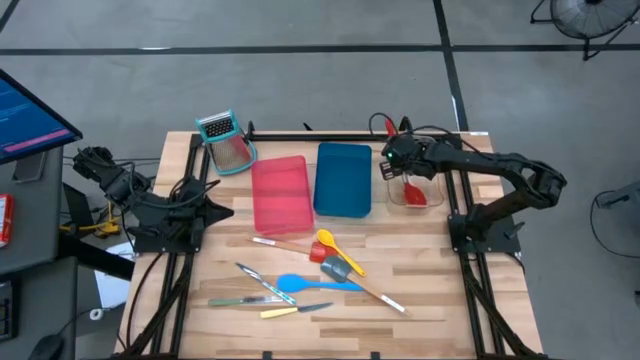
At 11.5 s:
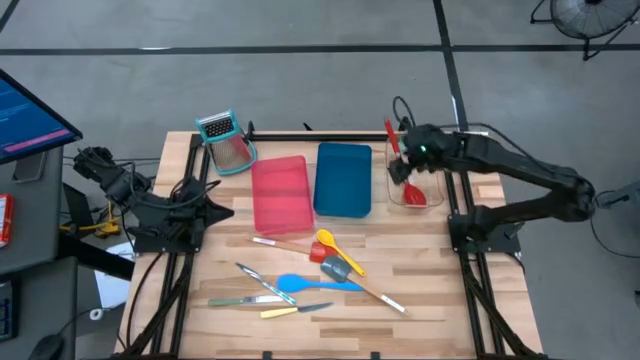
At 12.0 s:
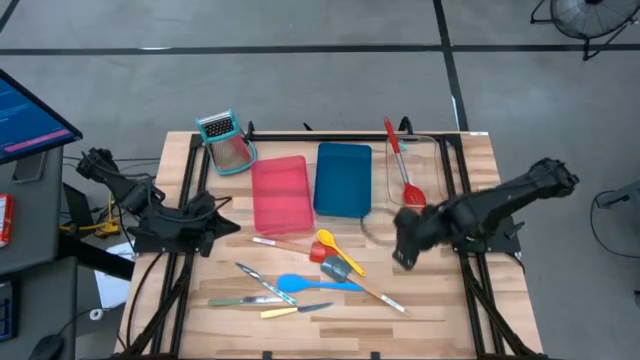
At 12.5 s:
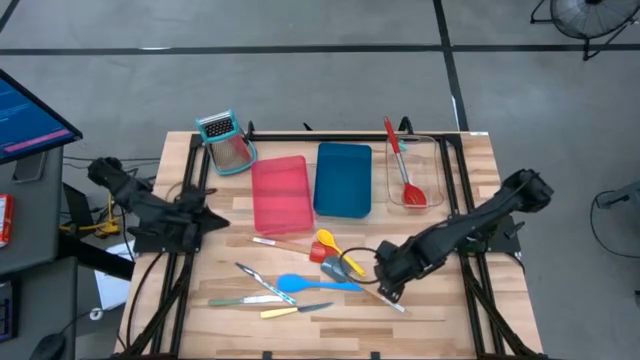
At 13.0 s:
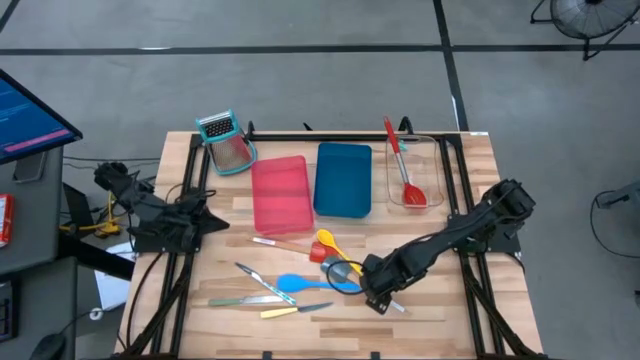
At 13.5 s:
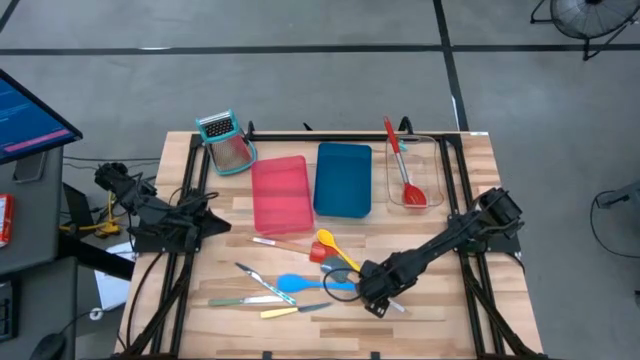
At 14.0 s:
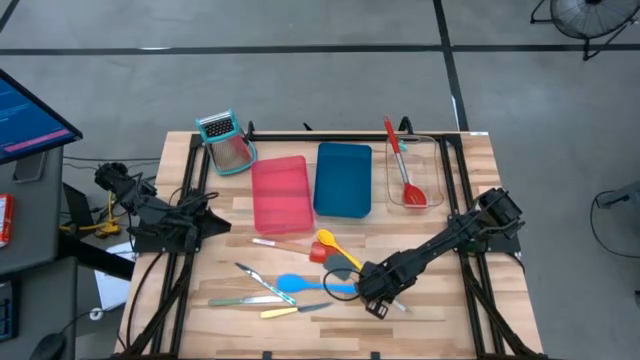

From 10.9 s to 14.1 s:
Task: Pick & Place Kitchen Items
Put the gray spatula into the blue bin

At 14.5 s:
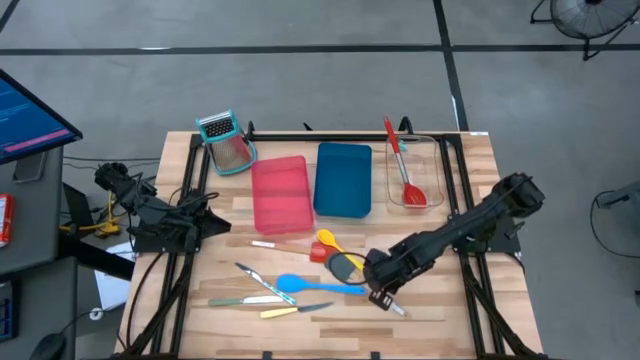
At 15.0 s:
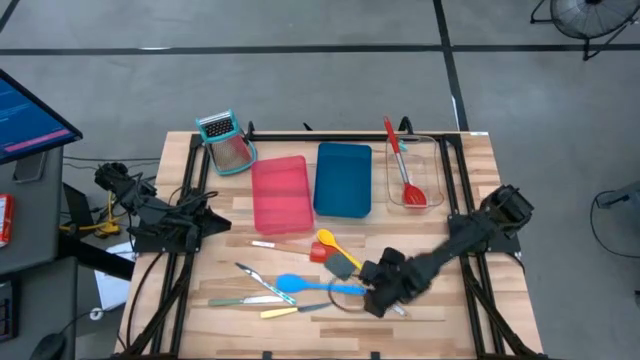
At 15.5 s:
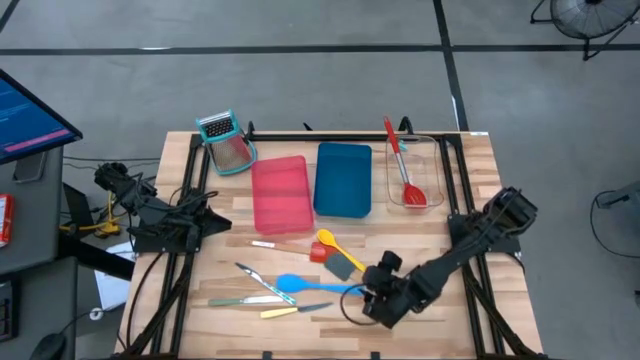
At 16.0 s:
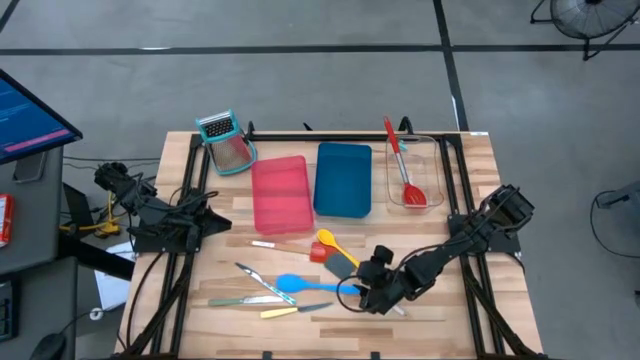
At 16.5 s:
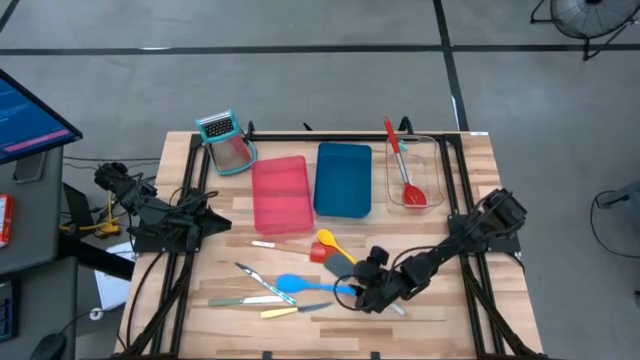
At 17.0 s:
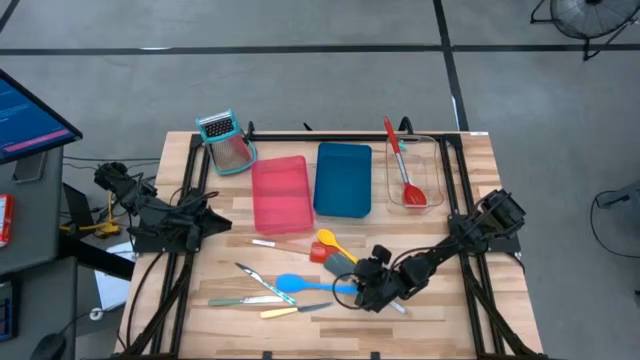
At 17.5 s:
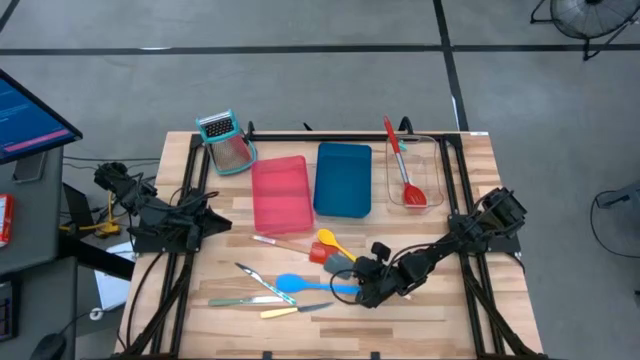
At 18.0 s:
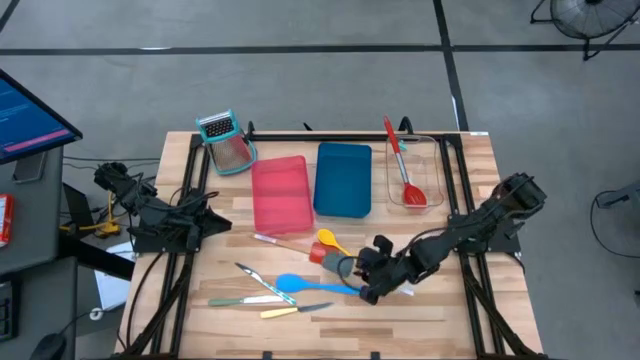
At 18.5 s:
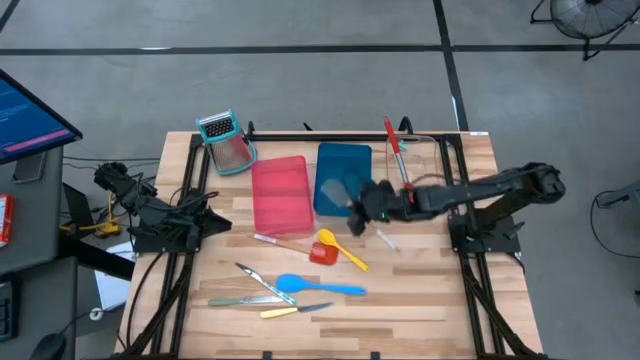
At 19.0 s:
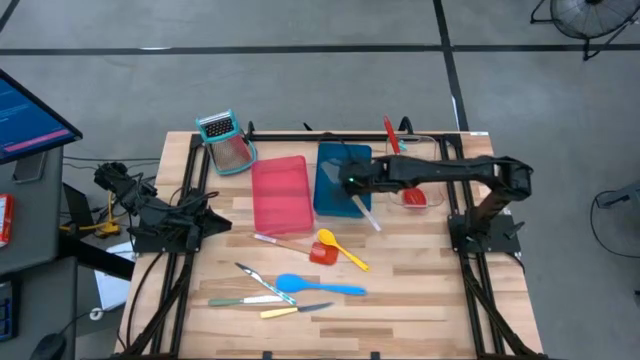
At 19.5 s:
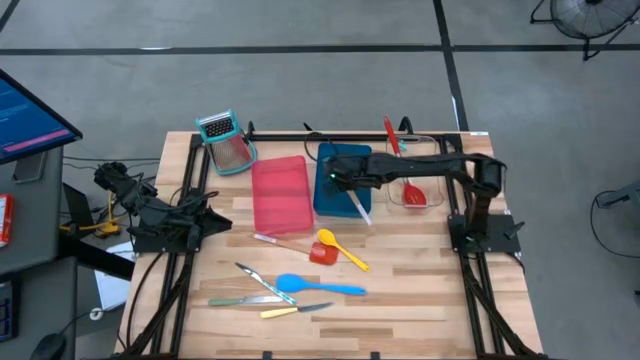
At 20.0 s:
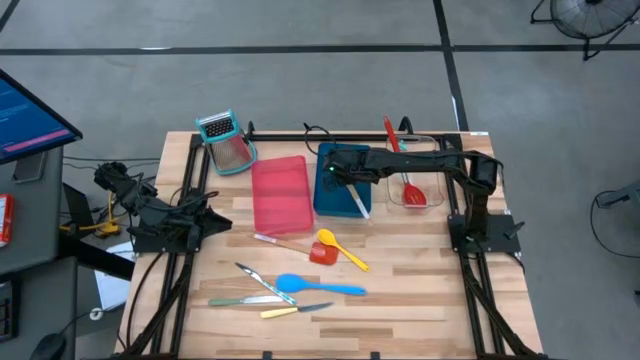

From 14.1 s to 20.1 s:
Put the gray spatula into the blue bin

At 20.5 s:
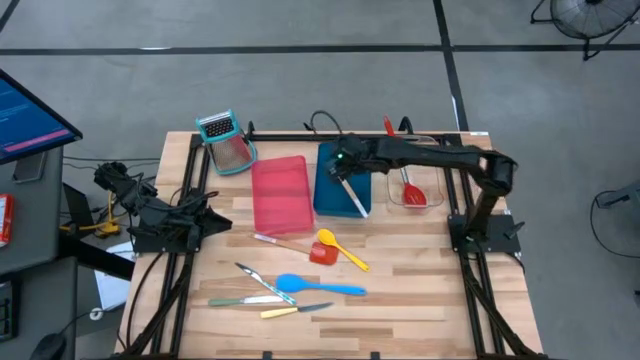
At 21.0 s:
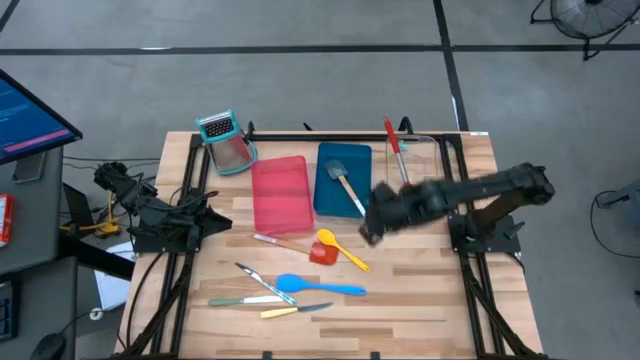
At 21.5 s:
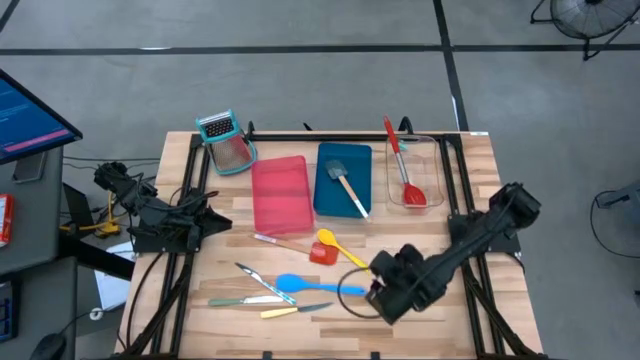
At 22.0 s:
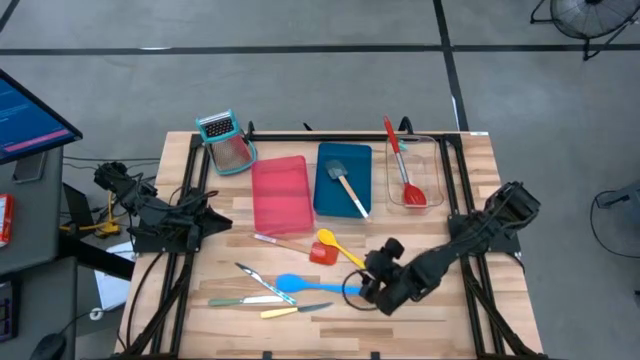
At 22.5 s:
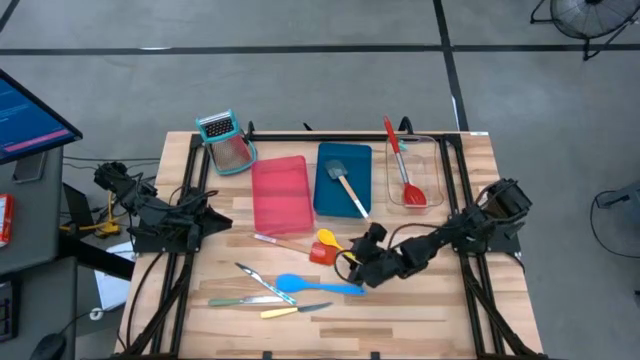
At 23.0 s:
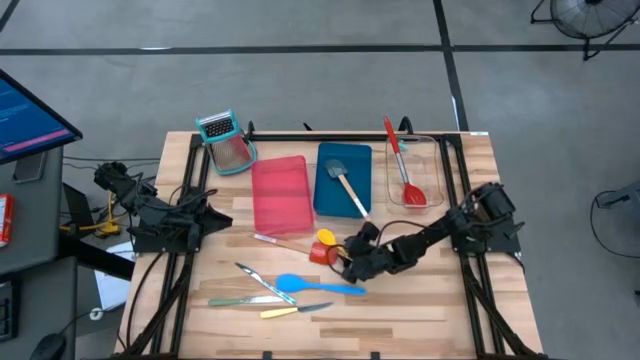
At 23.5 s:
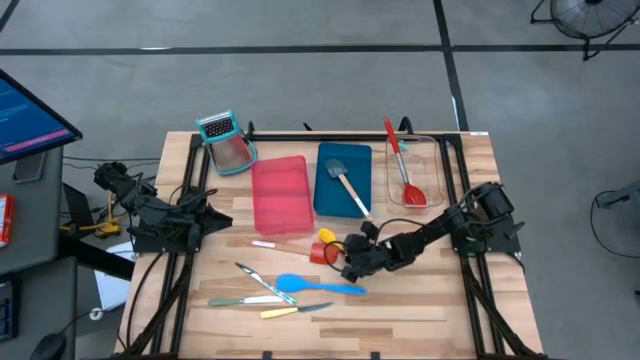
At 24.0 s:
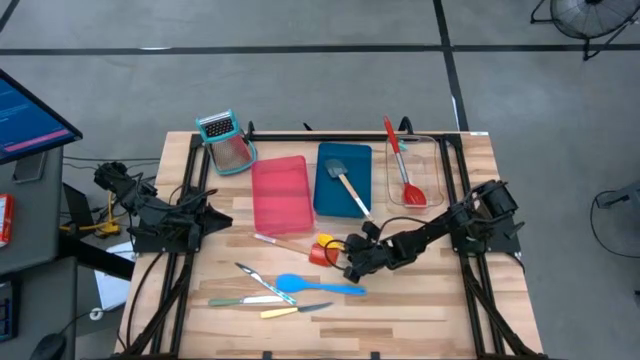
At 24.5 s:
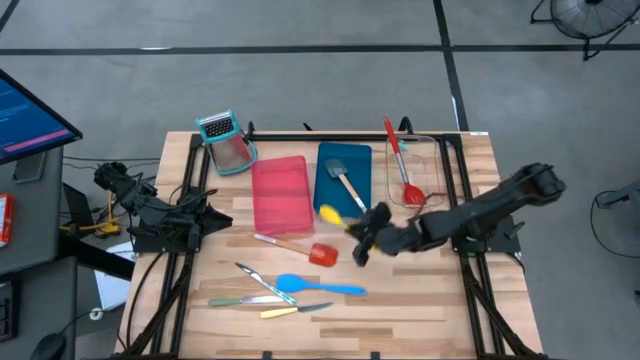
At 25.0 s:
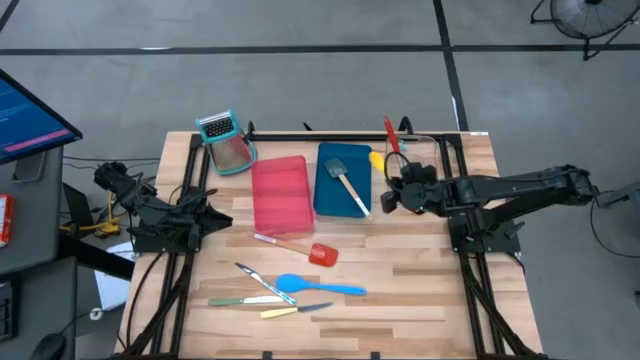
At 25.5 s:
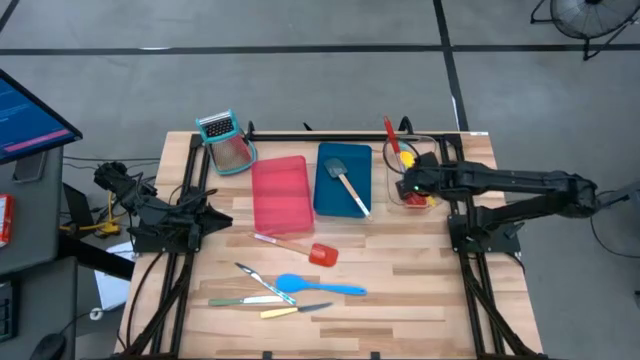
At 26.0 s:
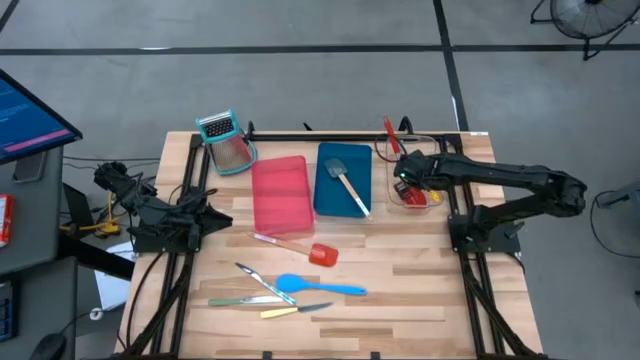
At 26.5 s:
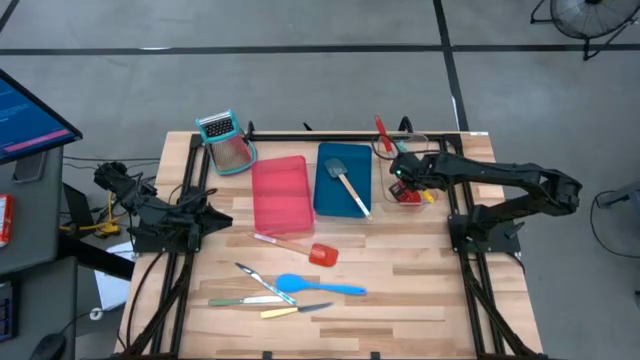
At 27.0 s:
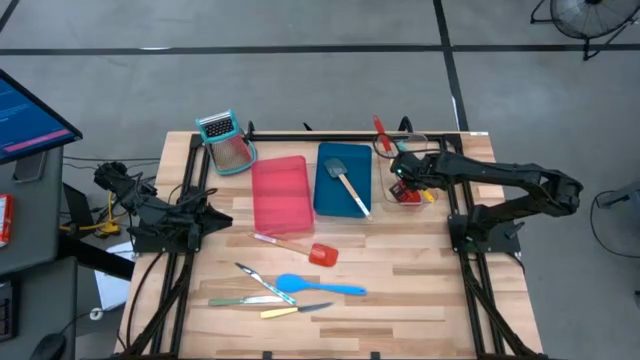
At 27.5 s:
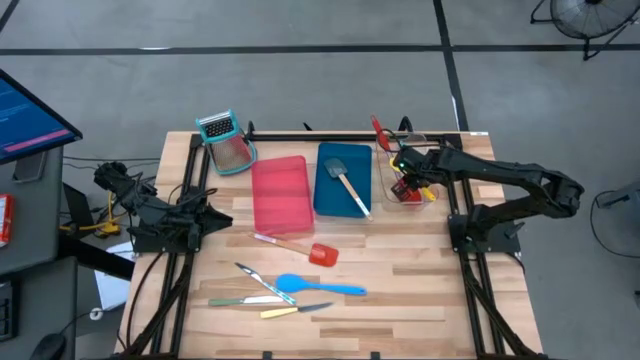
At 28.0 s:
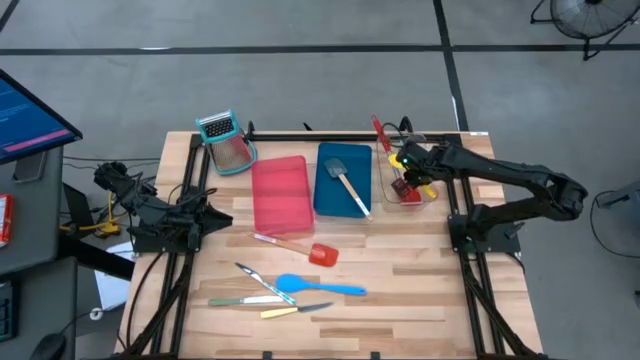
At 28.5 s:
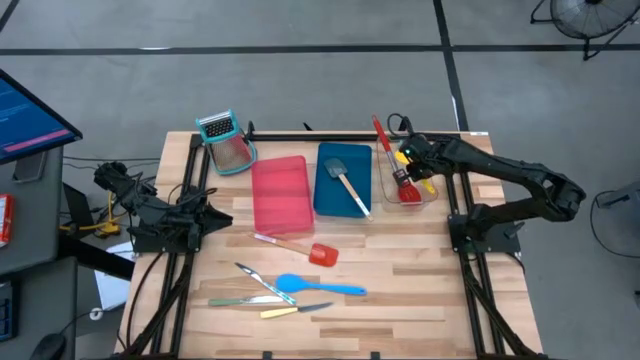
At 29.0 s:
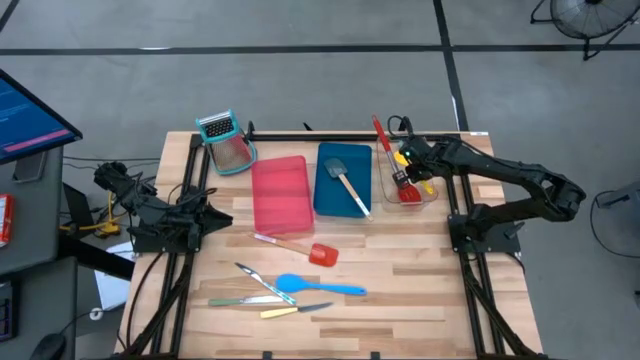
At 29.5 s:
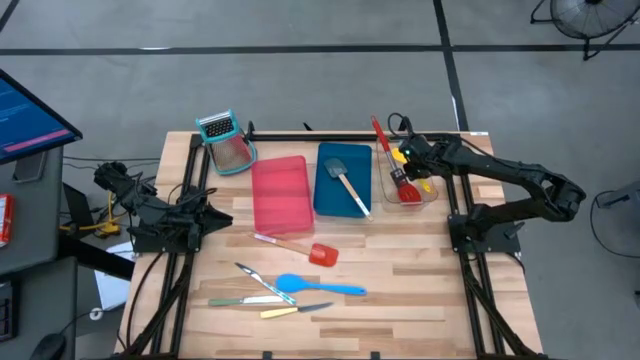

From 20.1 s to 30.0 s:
Put the yellow serving spoon into the transparent bin

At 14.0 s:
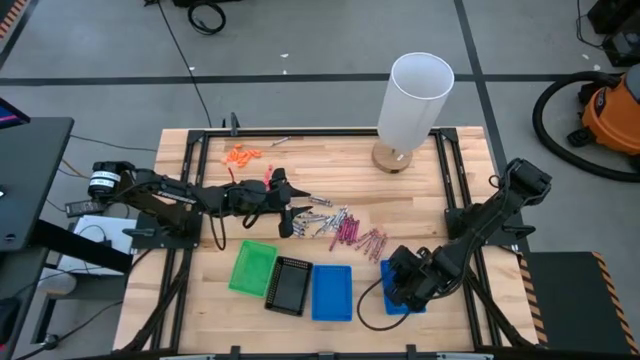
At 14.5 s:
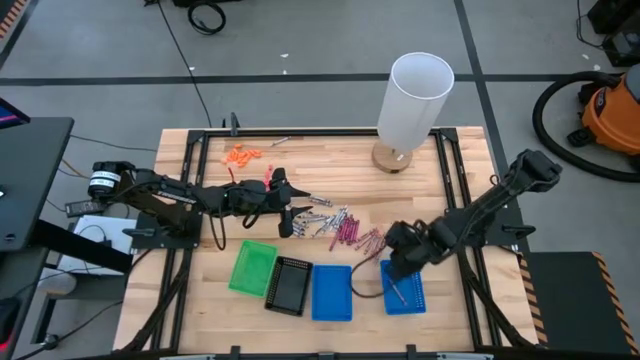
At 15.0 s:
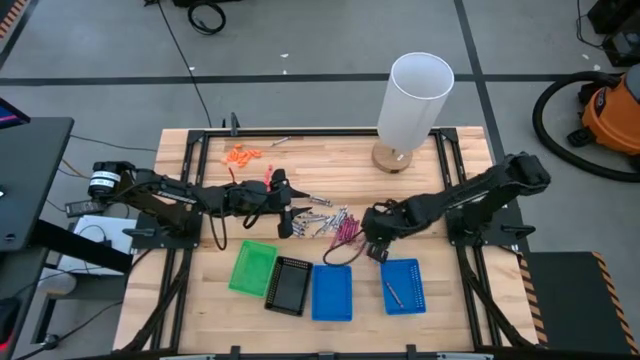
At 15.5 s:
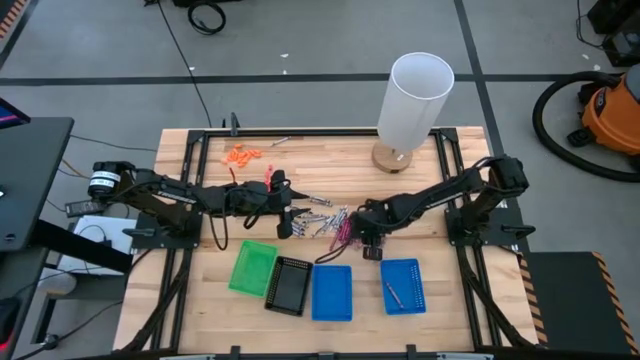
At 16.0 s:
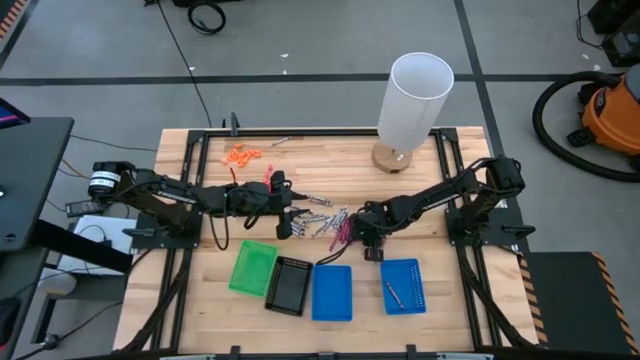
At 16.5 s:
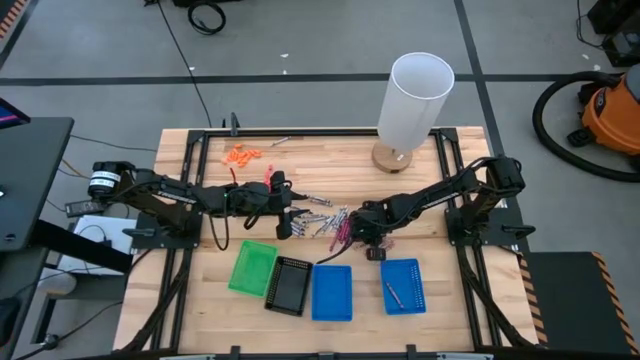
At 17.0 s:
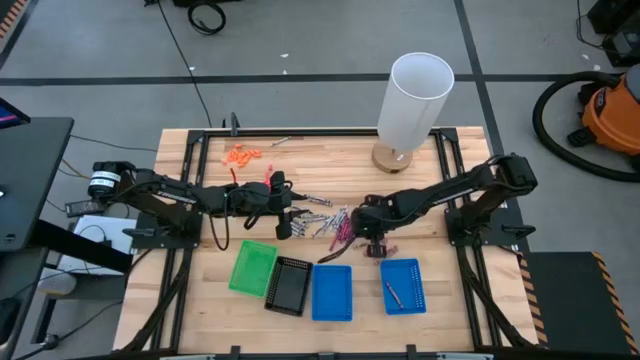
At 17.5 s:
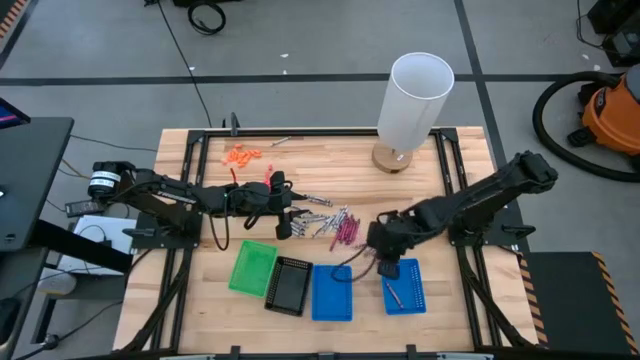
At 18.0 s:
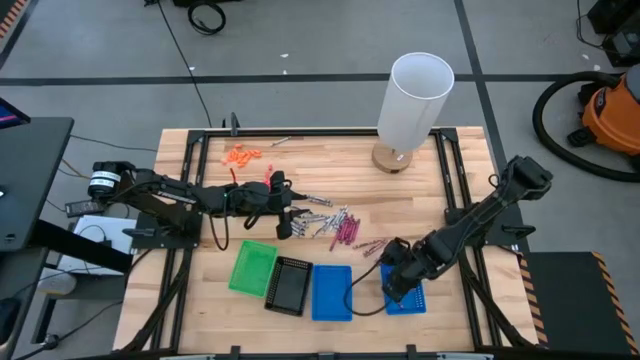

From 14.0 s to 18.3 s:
Task: Sort crayons
Put the pink crayon into the right blue bin
